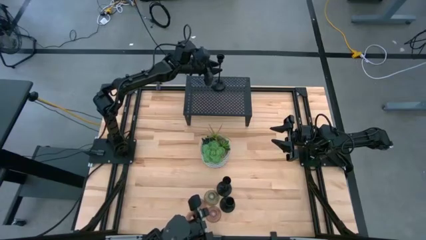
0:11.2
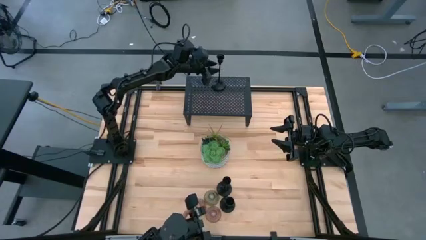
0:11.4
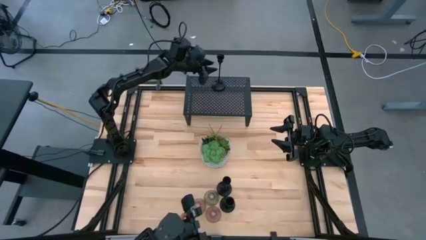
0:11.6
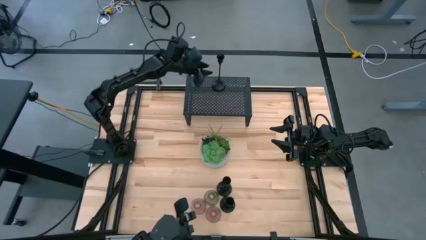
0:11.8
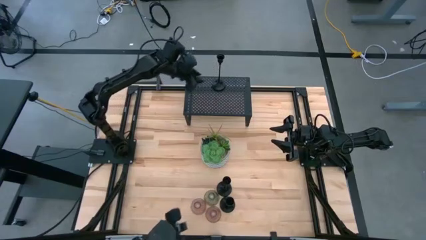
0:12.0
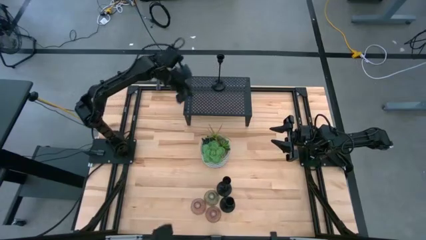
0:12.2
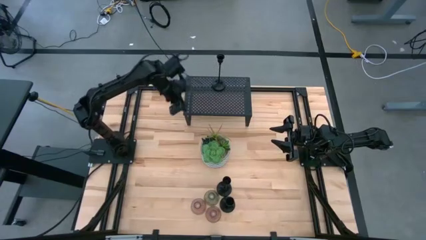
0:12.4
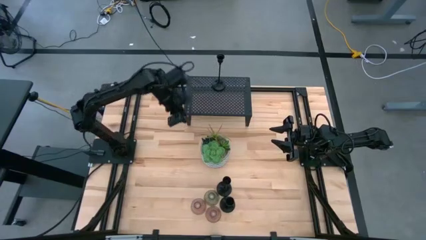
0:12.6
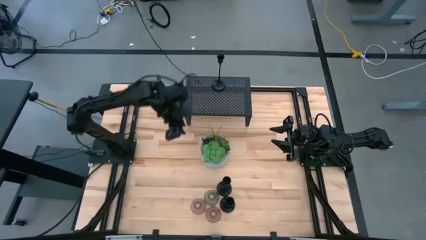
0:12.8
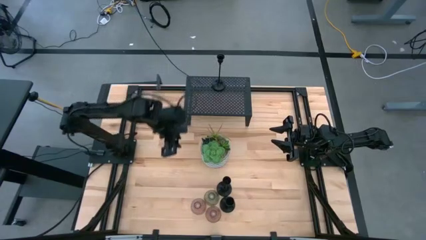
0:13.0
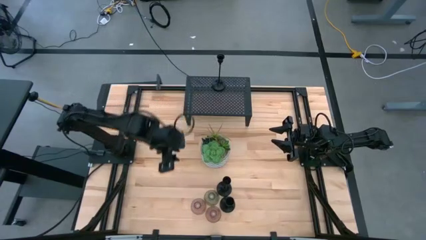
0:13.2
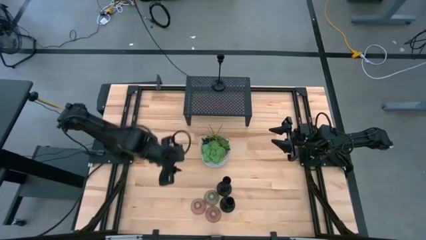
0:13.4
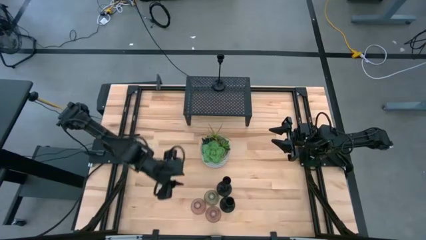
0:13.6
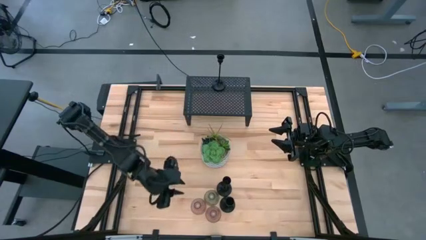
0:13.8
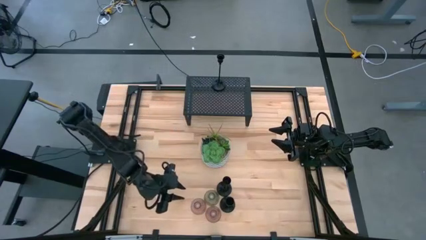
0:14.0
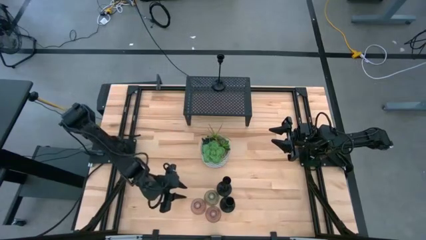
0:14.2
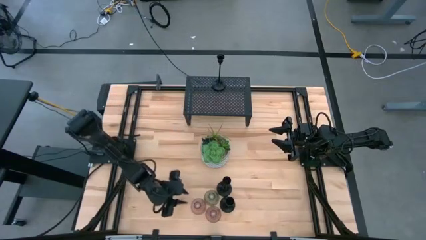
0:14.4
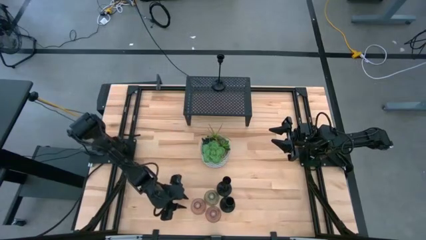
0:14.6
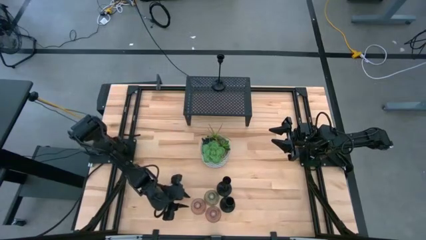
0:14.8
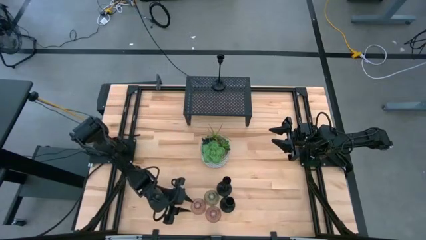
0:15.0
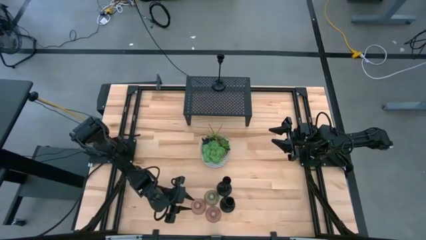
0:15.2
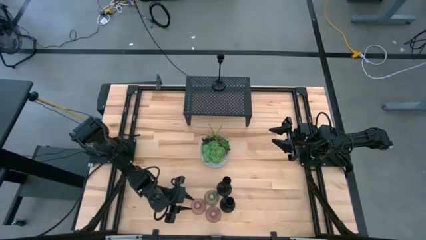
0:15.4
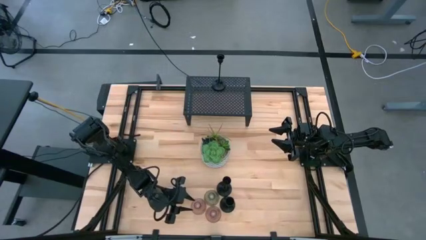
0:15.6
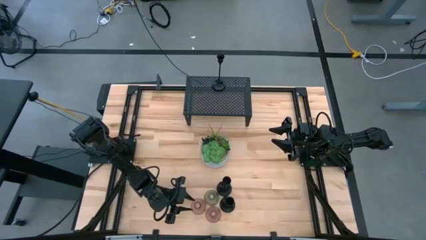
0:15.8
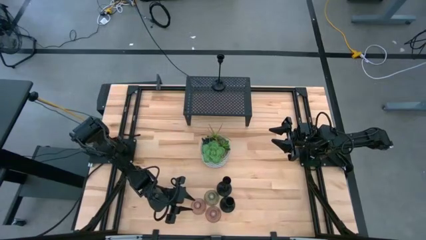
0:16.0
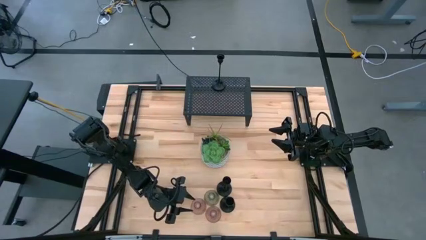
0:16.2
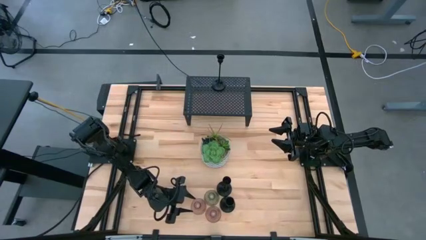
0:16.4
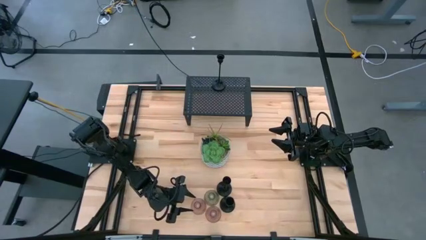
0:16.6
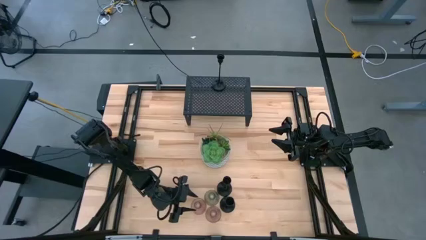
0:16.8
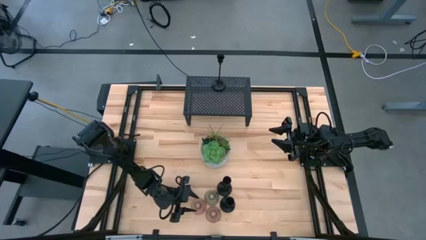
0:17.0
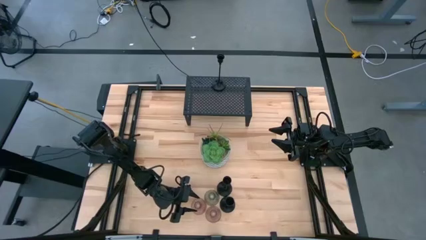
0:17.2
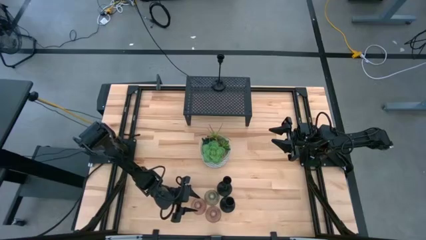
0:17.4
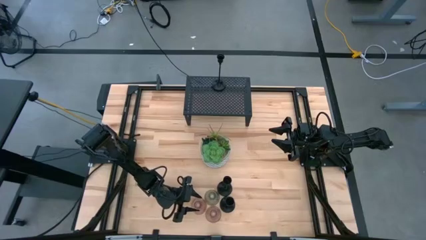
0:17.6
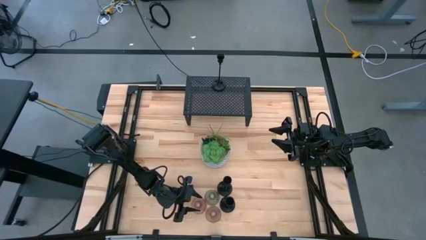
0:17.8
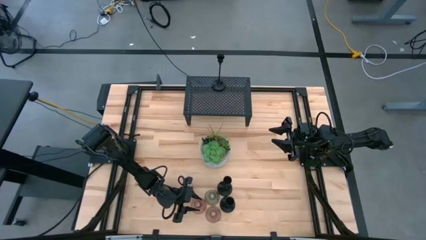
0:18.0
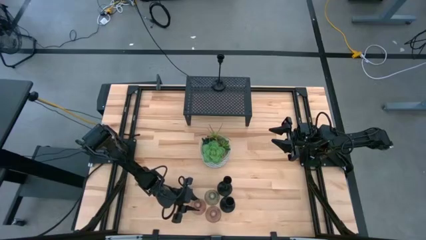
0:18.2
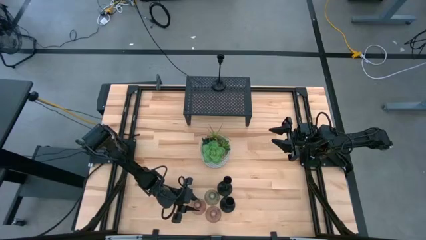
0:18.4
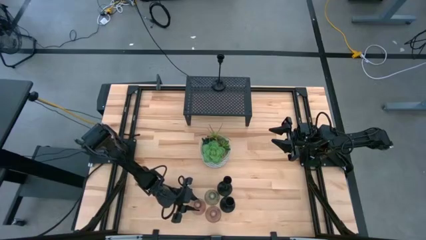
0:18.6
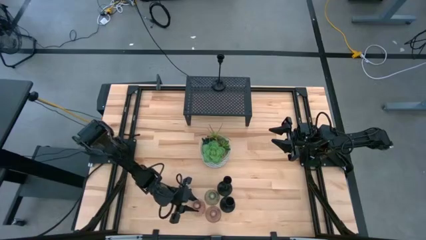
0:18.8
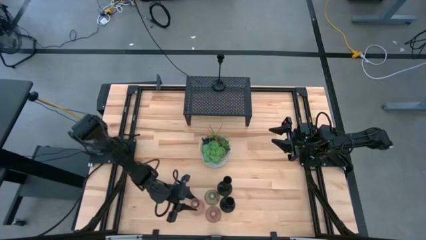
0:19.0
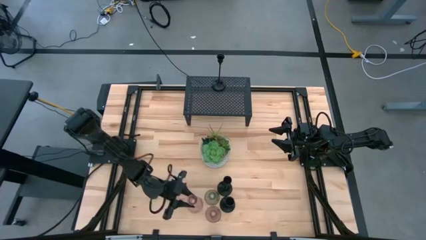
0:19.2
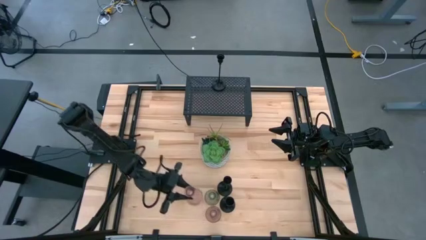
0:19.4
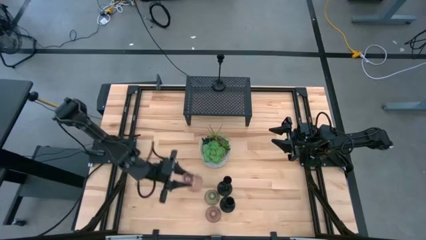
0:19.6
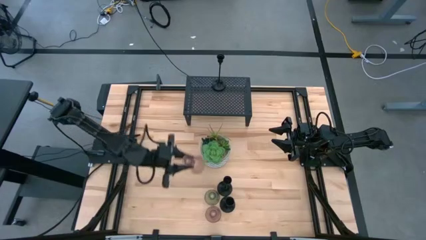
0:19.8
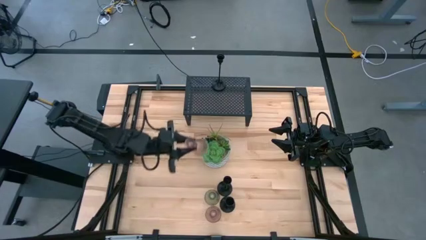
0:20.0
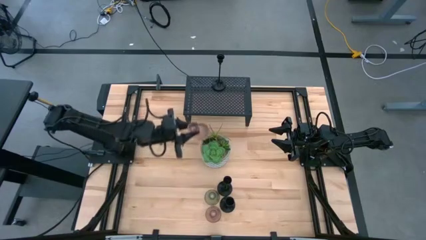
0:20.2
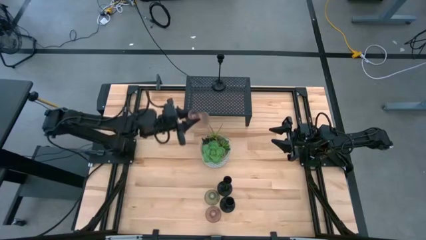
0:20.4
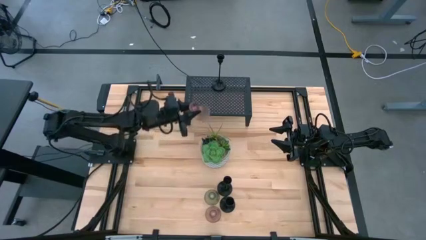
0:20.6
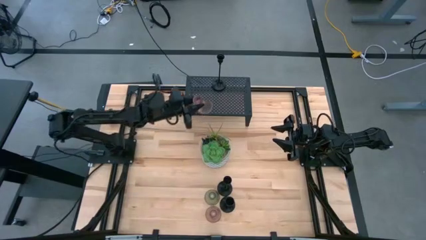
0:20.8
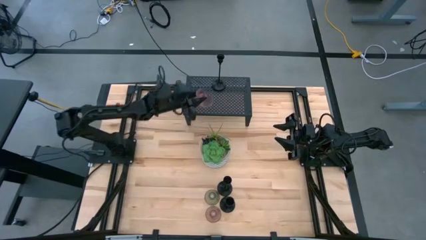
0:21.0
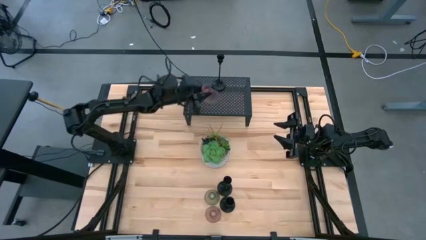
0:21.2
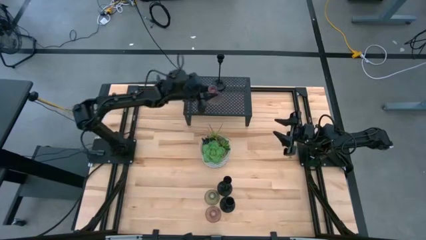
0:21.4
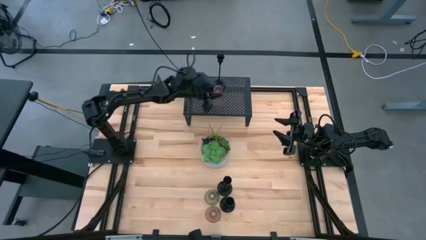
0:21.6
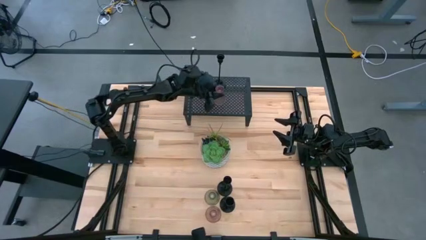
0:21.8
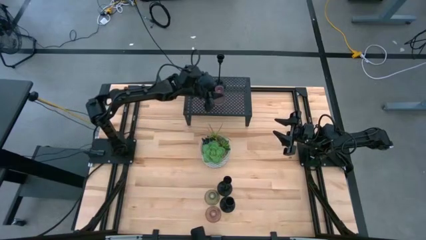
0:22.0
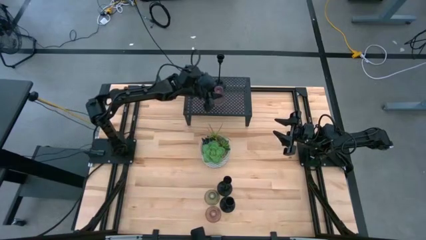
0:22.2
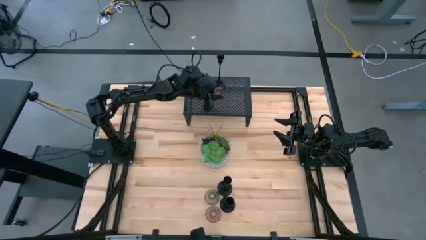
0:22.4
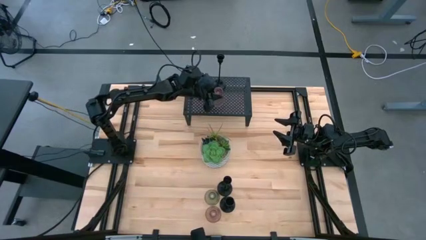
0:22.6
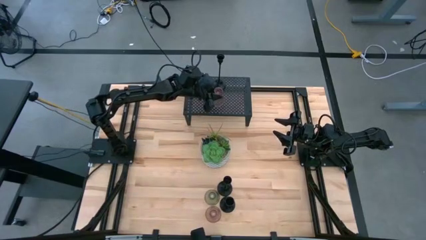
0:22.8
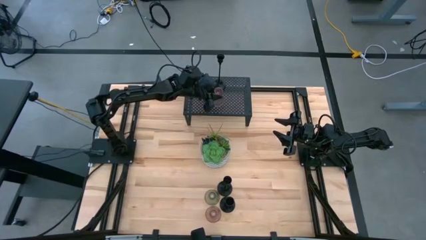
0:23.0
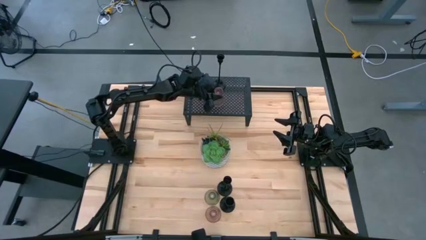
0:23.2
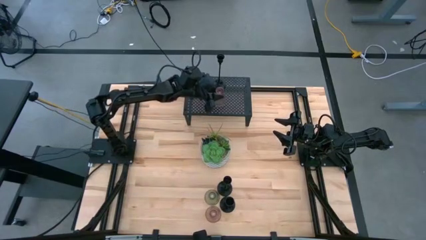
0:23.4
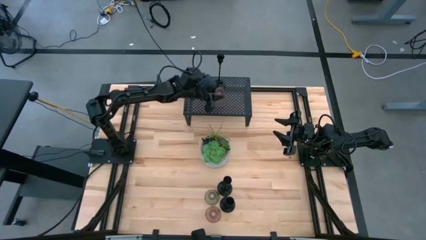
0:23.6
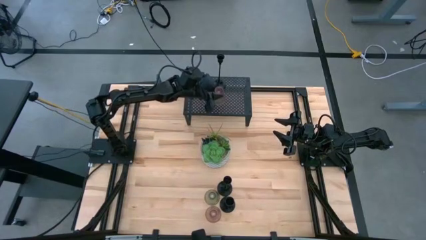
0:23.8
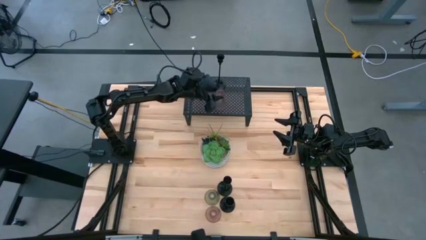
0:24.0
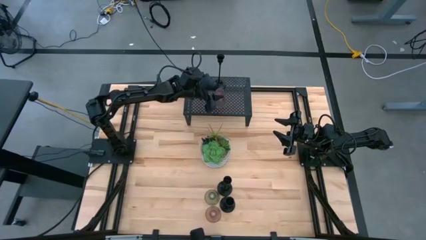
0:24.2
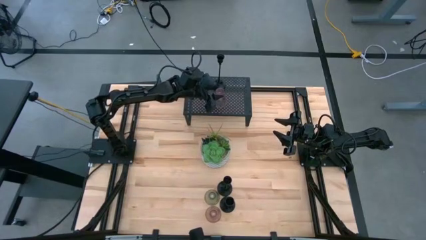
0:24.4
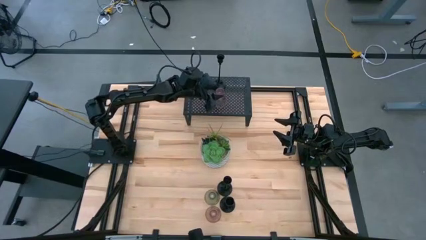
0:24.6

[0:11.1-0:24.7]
Task: Pick & Place candle stick holders
Put the left pink glass candle holder on the shelf

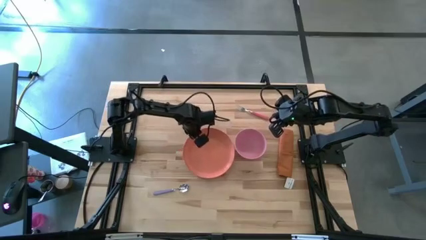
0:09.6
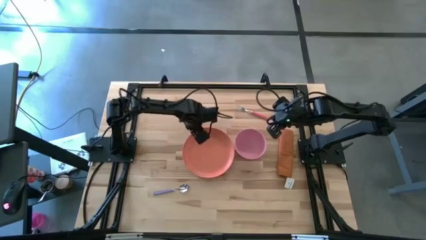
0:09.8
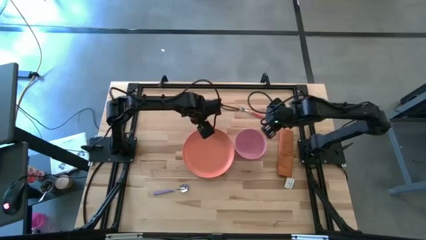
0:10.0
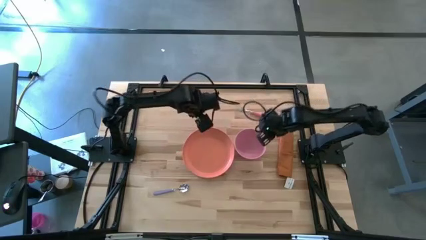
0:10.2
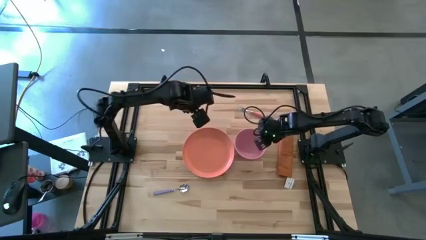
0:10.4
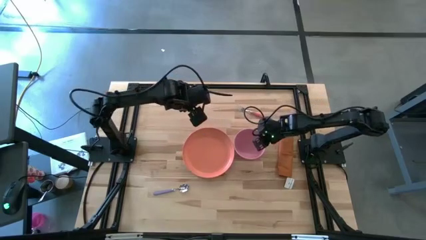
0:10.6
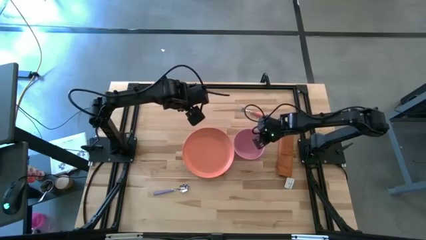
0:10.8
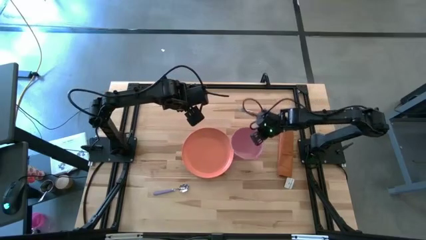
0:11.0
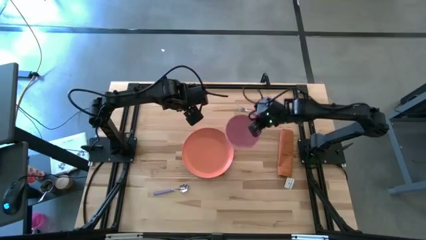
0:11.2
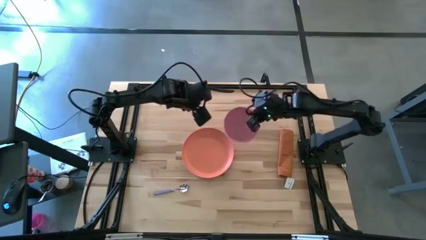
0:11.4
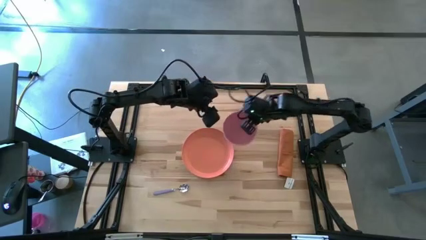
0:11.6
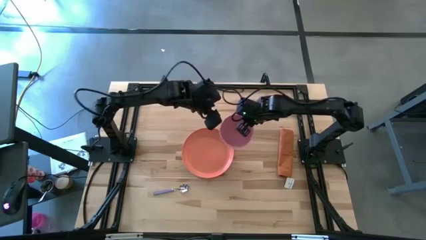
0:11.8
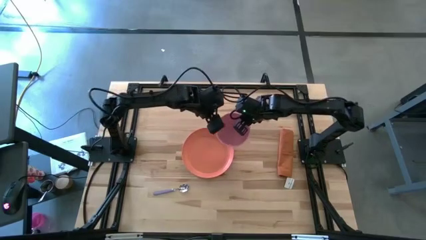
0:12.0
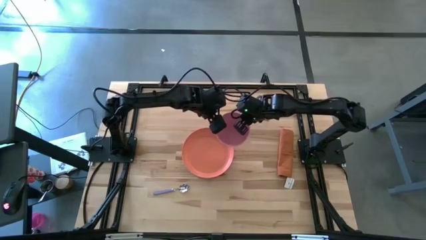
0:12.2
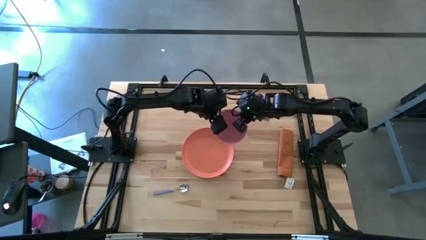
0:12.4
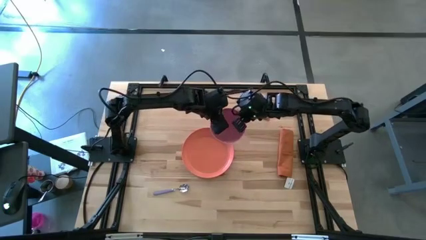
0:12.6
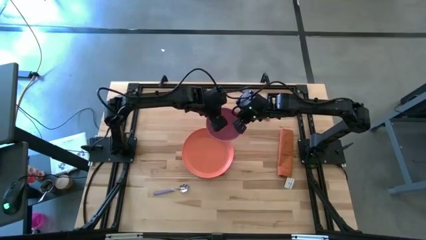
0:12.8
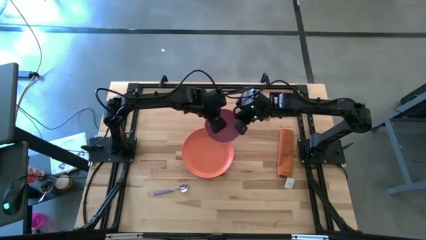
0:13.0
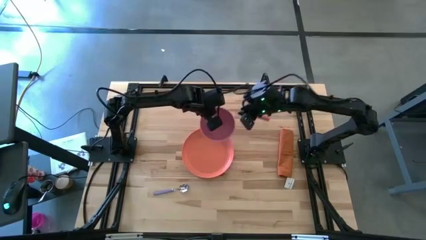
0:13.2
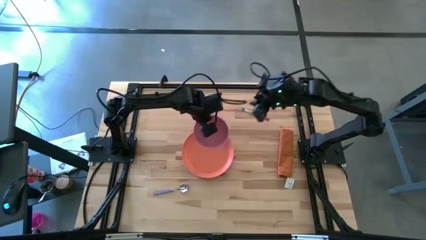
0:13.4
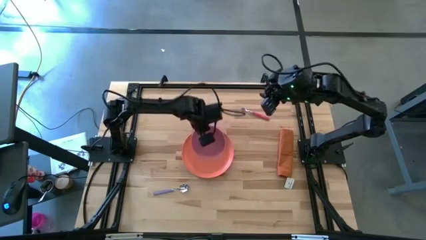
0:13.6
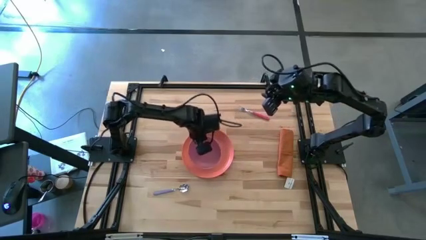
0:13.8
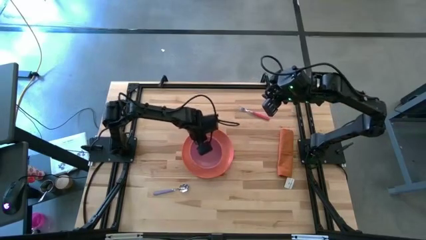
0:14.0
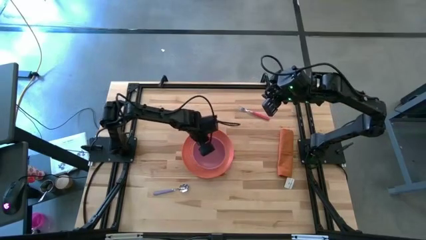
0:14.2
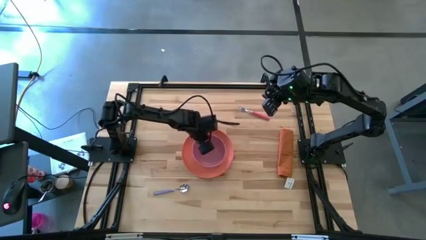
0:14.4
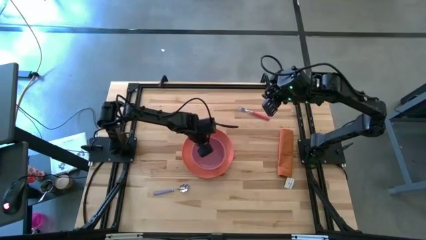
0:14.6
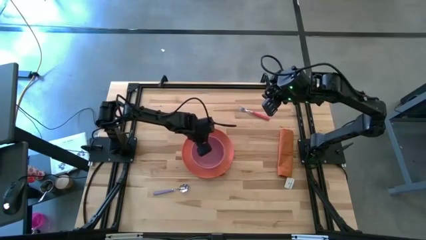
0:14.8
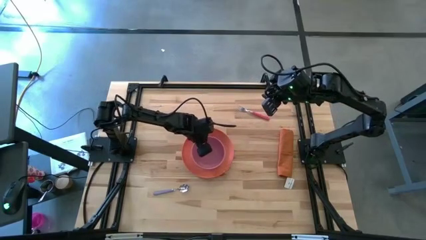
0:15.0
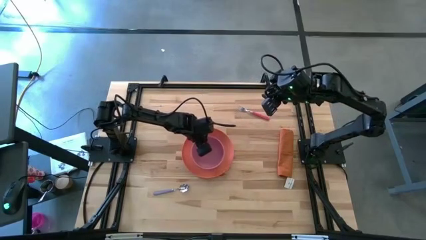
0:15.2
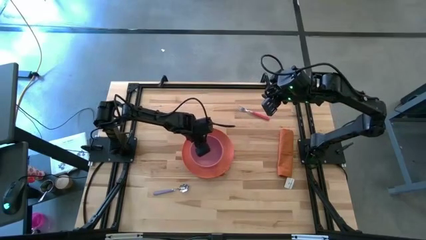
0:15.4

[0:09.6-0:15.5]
Task: Set table place
Put the bowl on the plate
